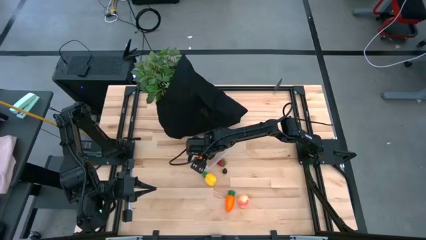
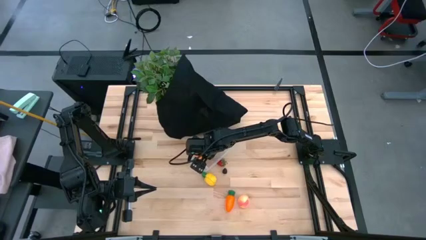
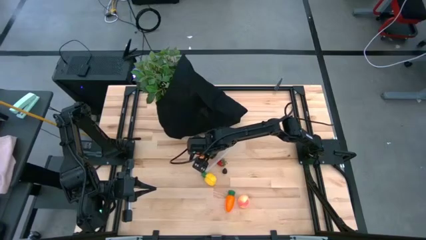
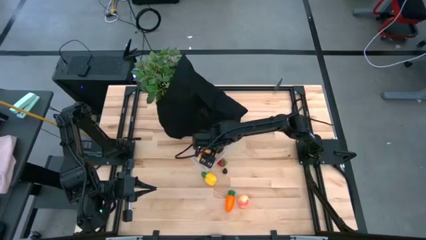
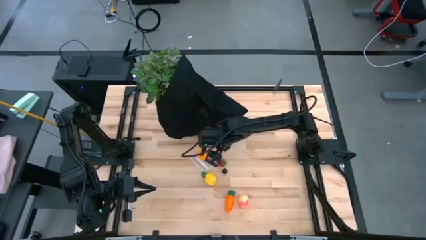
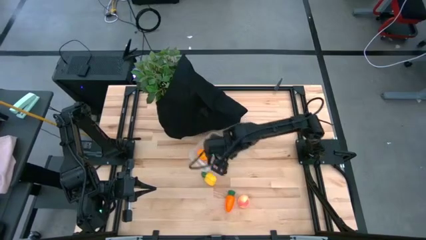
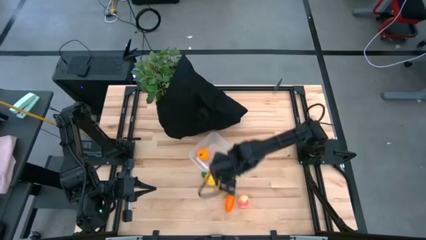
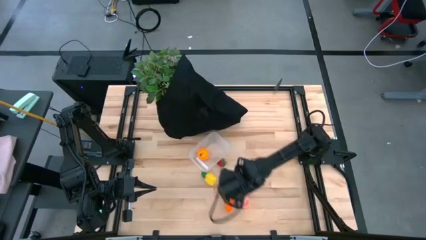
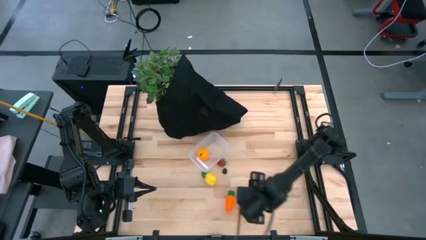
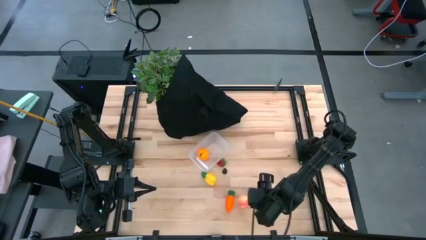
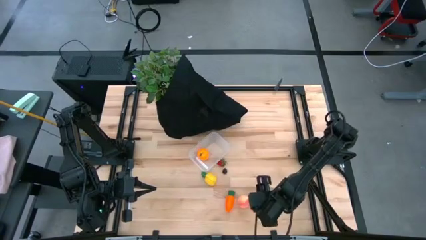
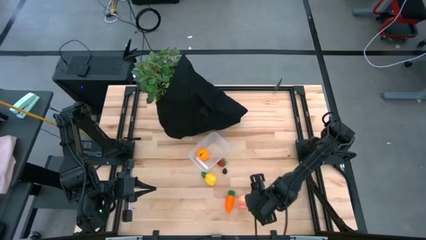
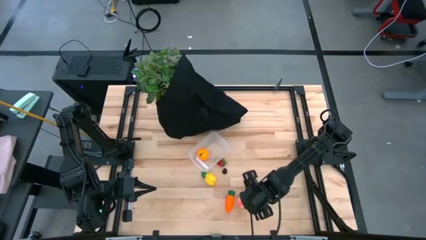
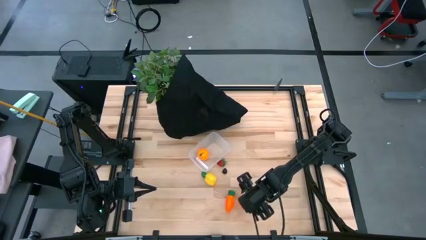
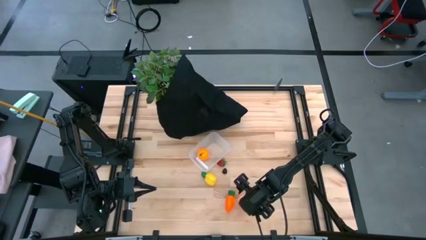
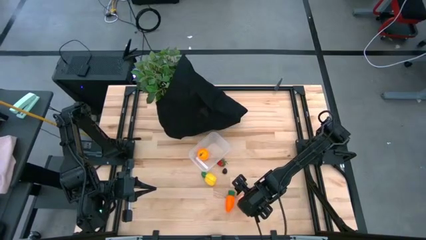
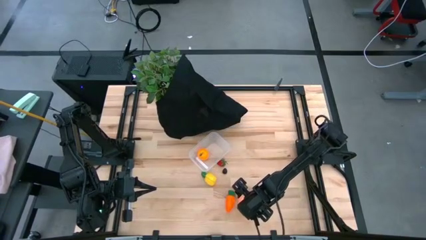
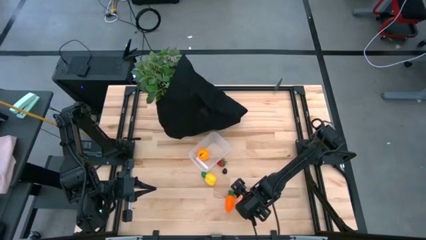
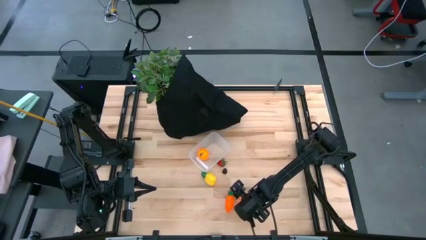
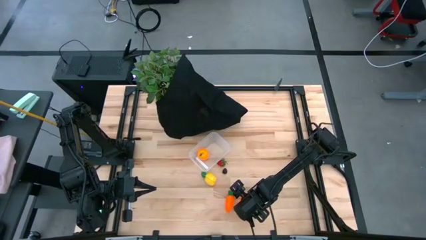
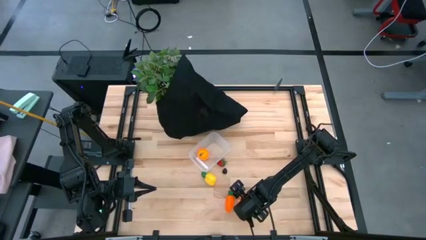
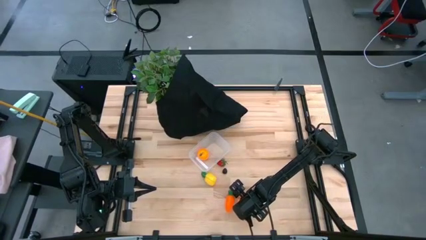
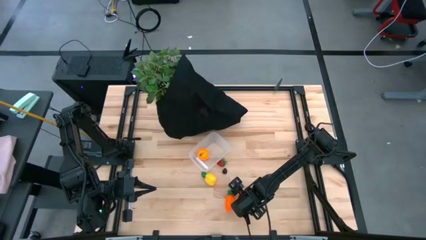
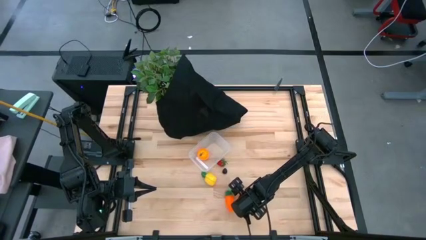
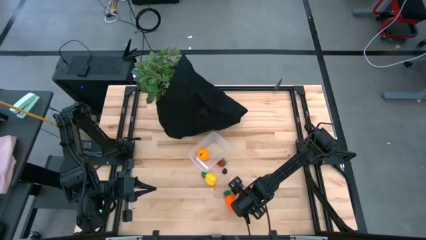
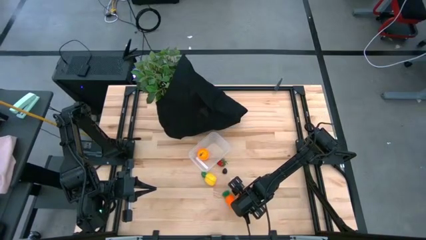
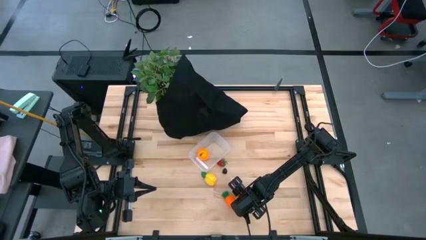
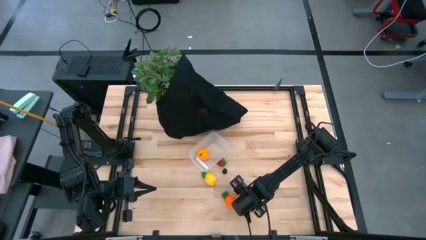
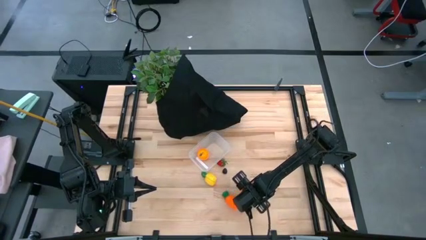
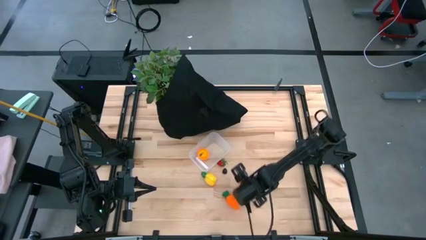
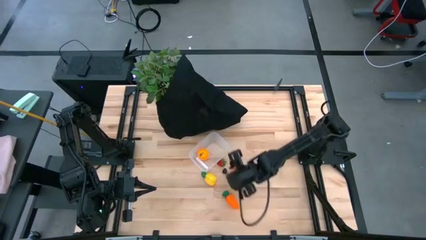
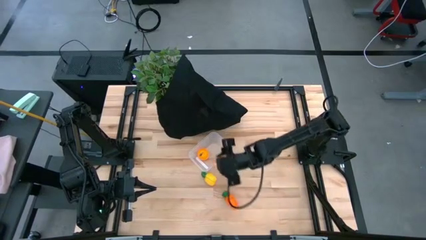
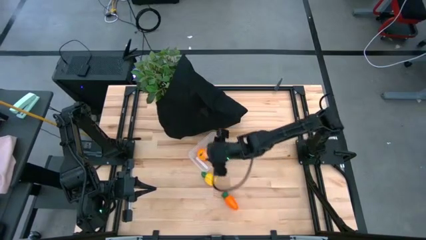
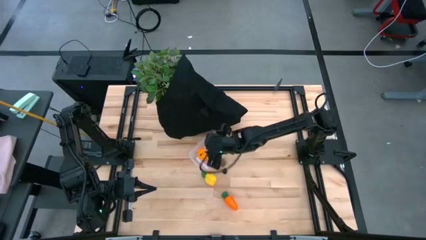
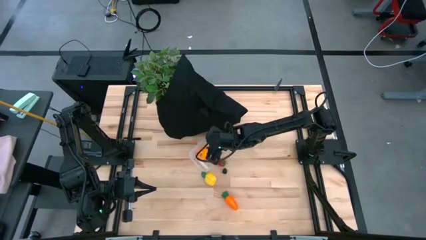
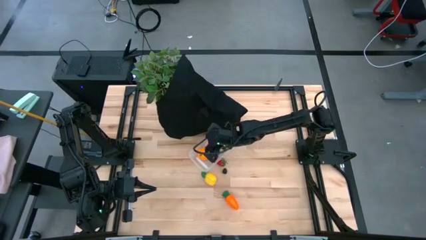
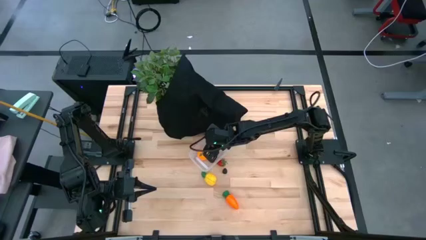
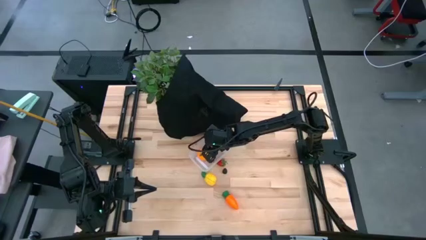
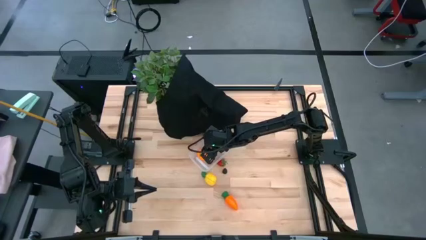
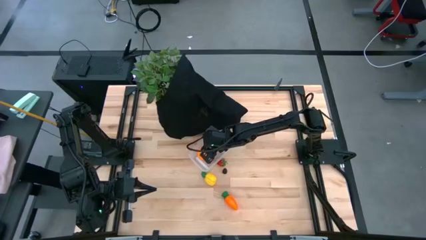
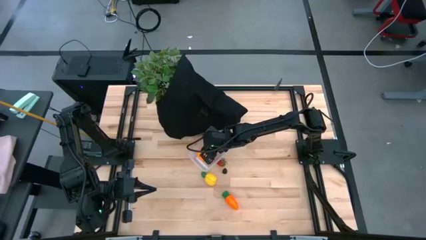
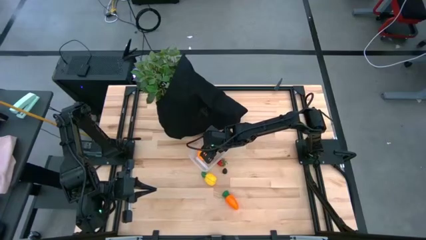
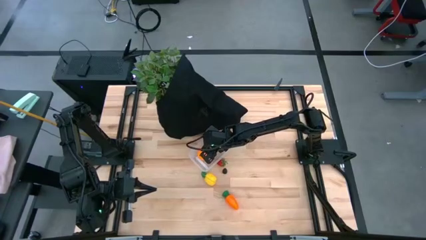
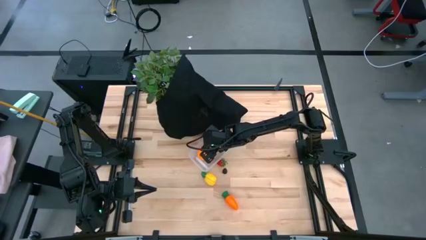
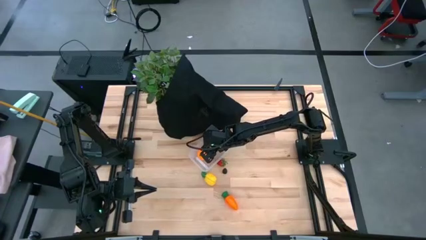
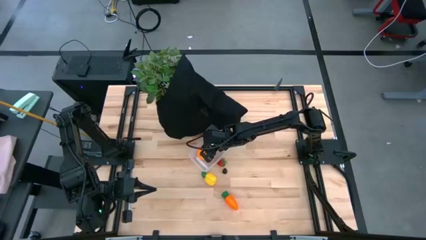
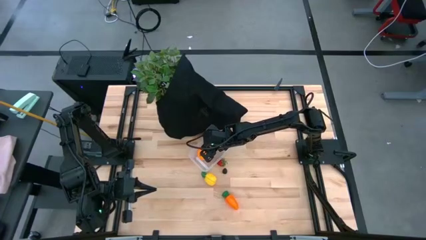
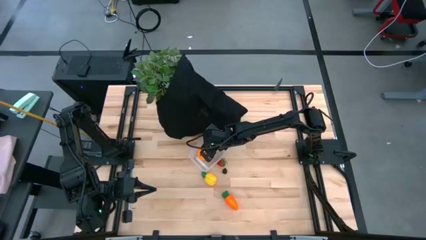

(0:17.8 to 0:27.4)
Task: Pick and placing Produce into tupperware
Put the pink peach into the transparent bin

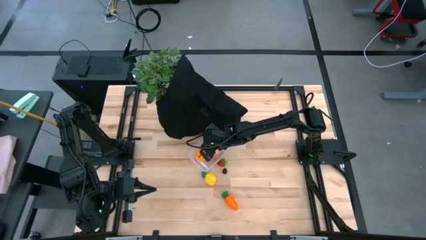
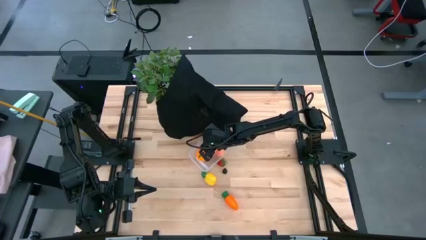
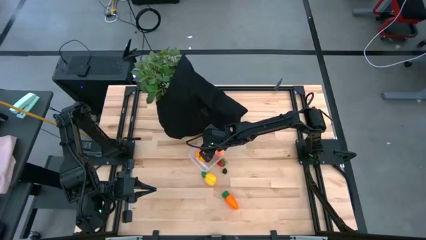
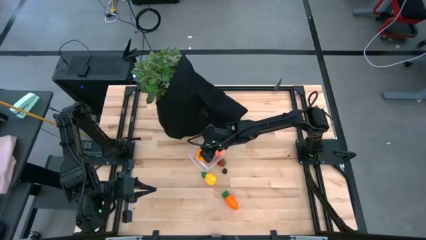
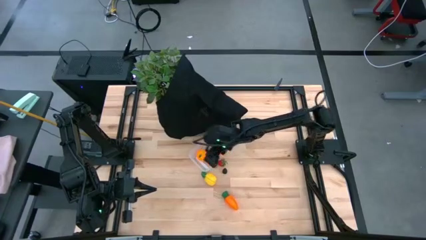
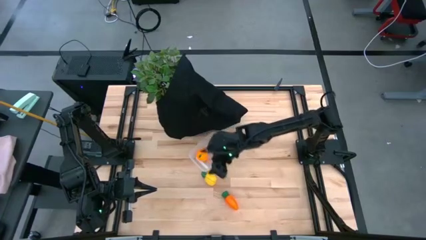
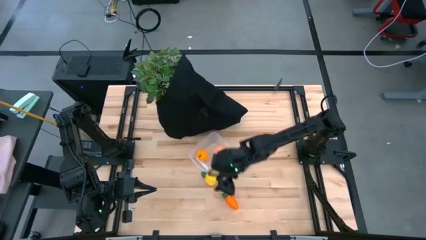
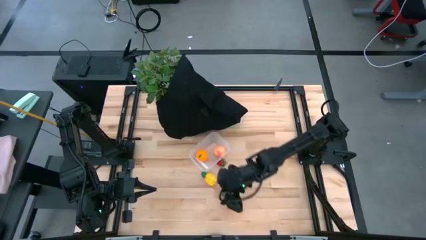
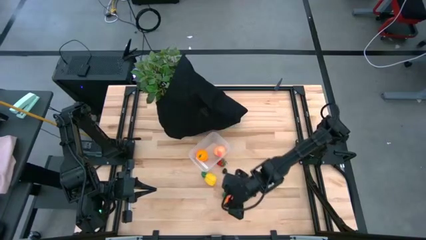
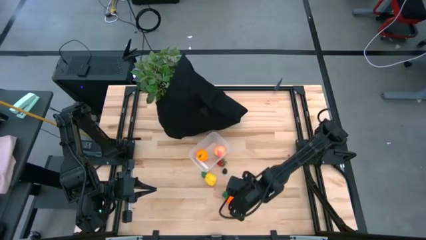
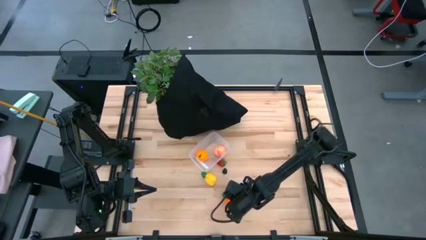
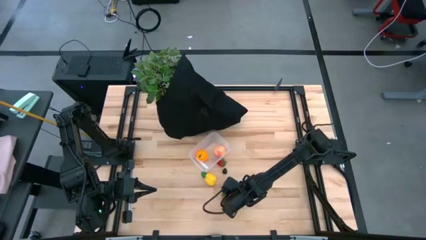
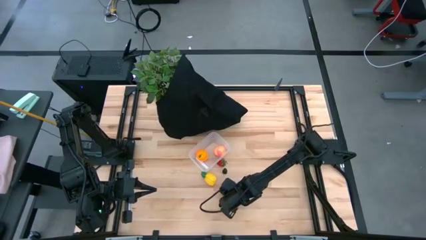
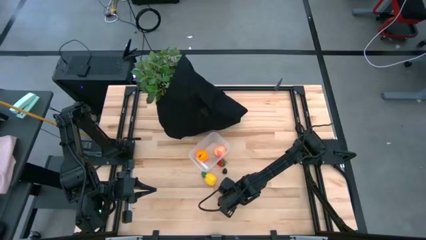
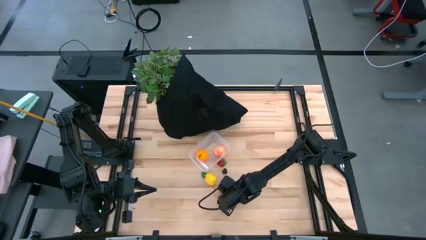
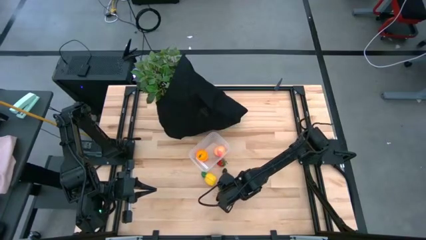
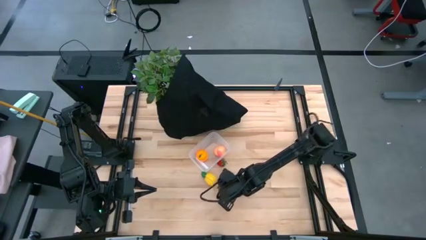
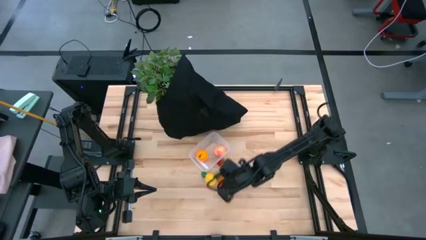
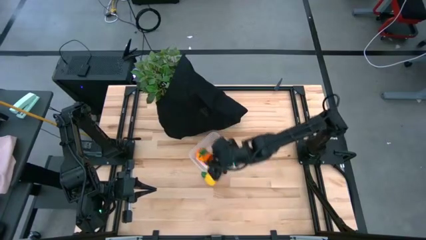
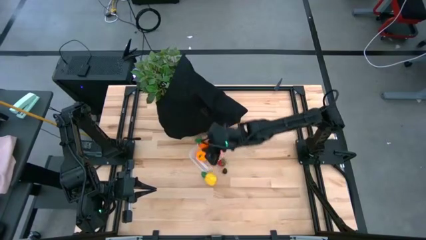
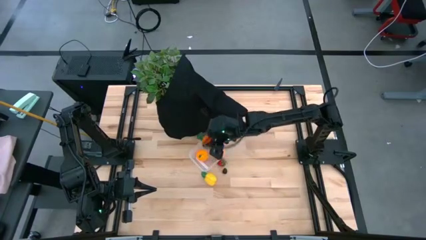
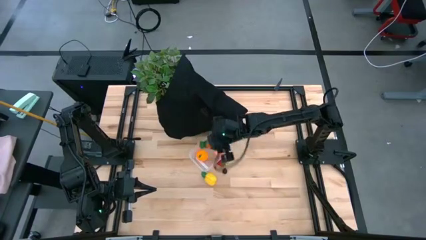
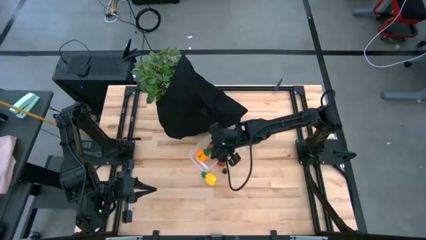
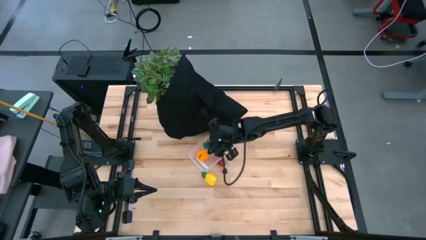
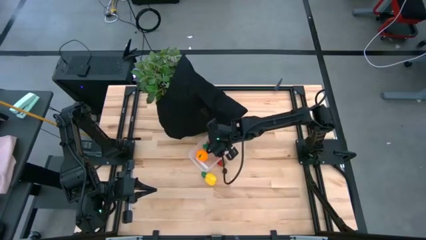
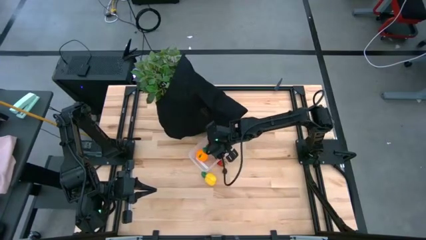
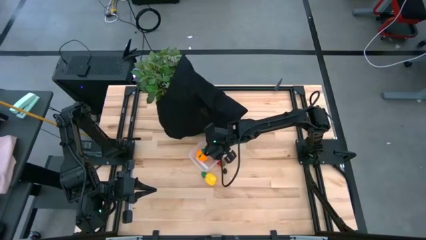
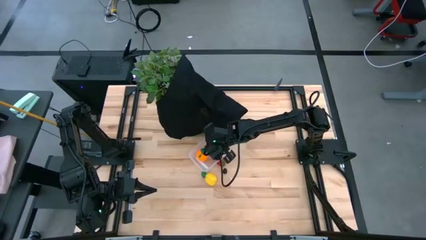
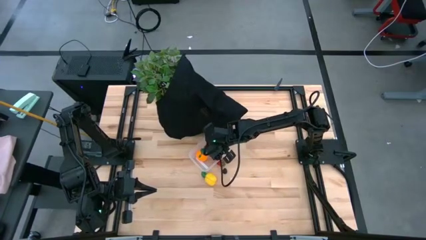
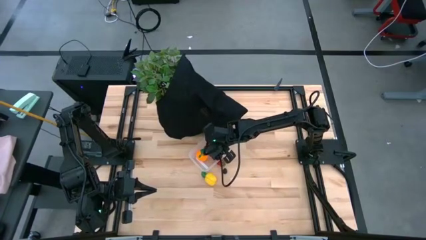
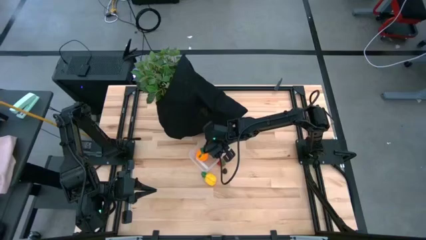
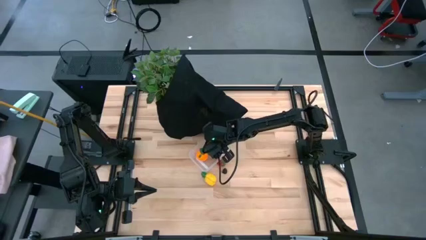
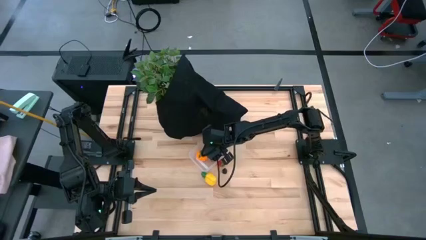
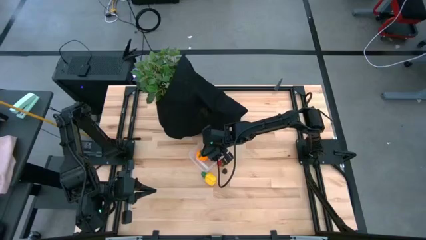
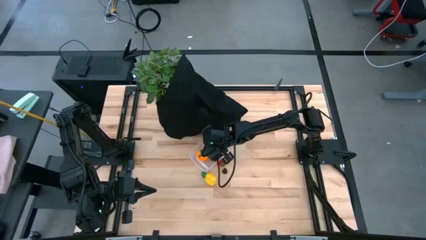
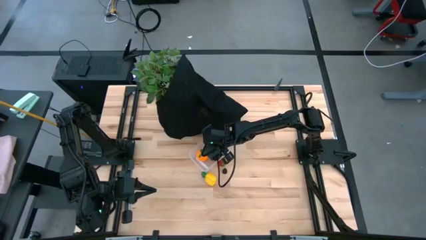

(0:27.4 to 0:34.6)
Put the orange carrot into the transparent bin
